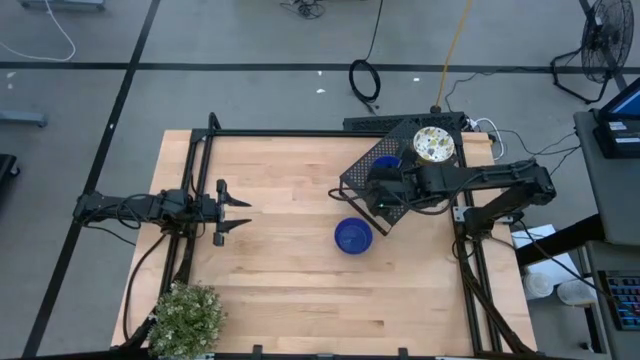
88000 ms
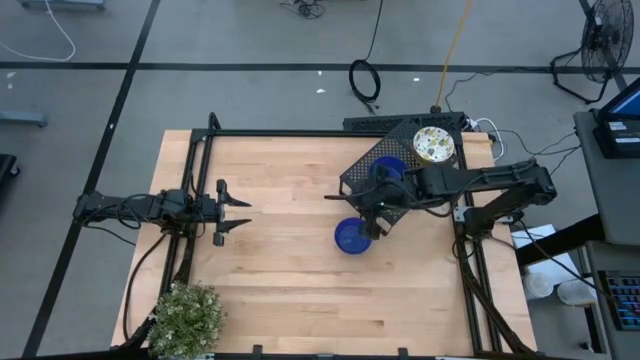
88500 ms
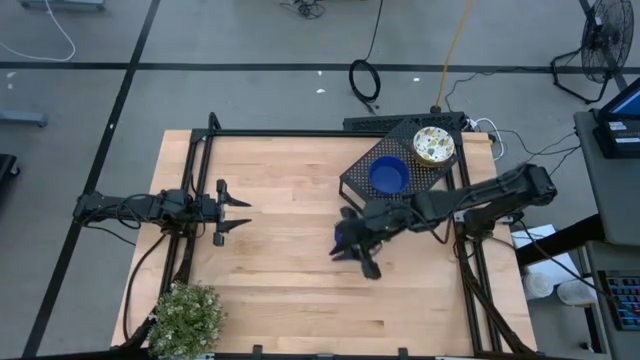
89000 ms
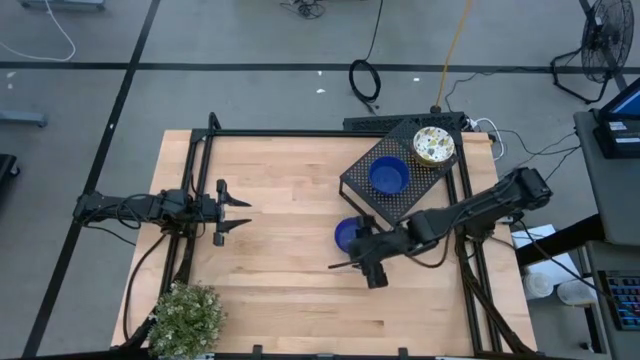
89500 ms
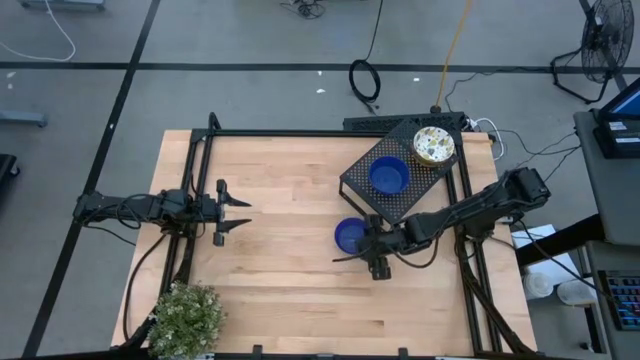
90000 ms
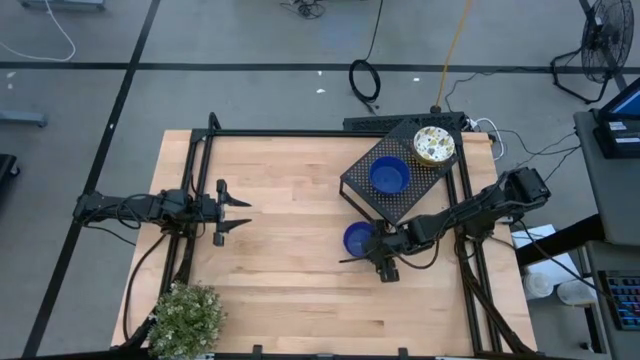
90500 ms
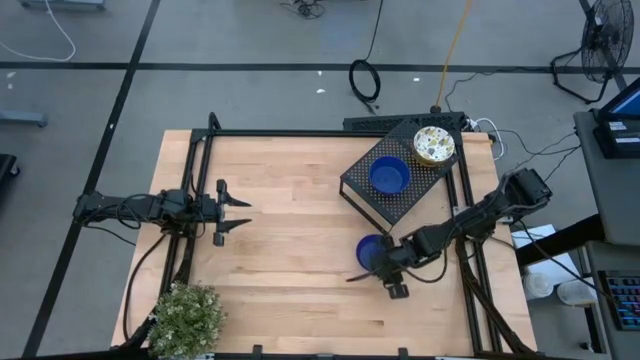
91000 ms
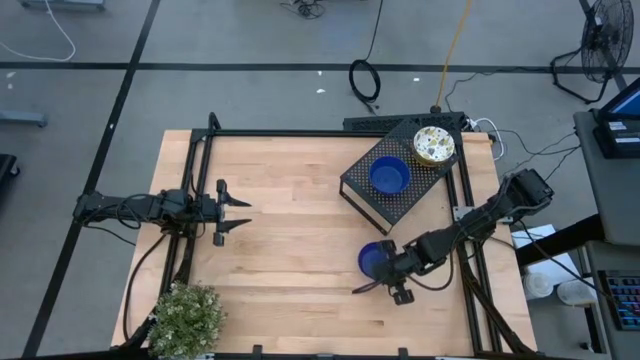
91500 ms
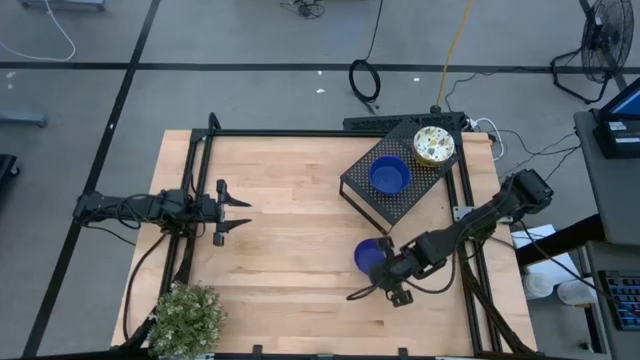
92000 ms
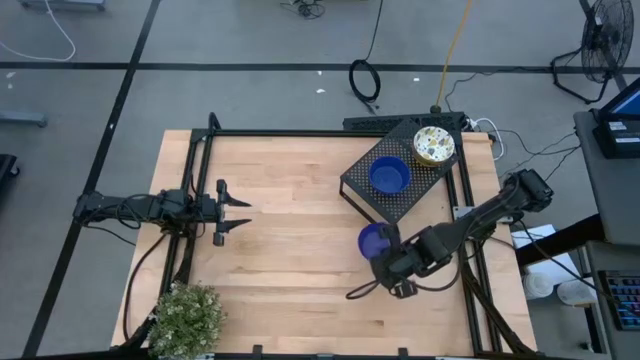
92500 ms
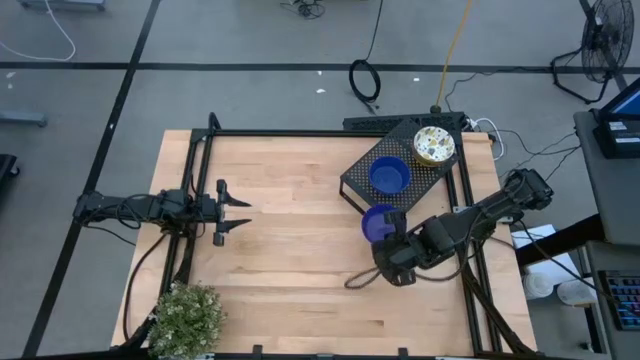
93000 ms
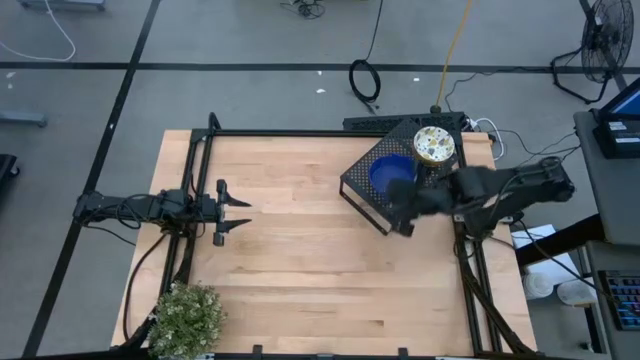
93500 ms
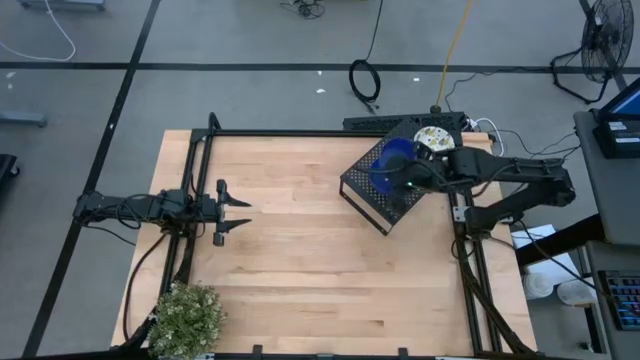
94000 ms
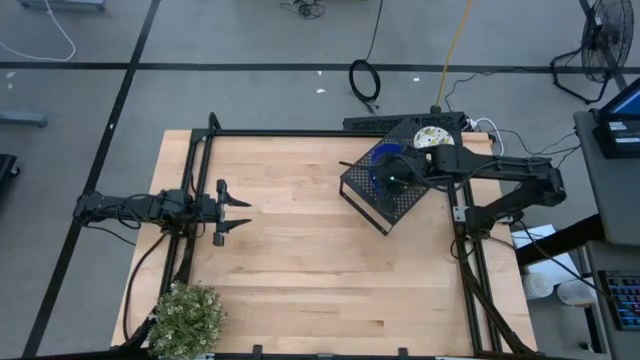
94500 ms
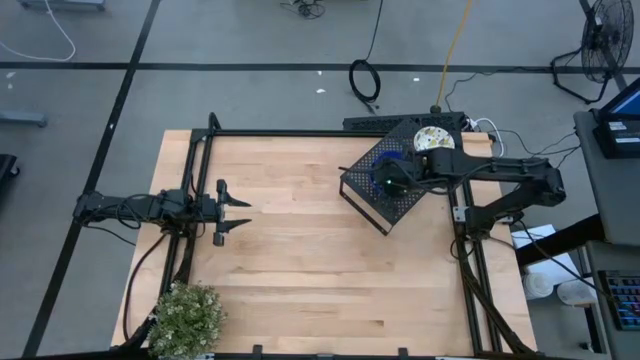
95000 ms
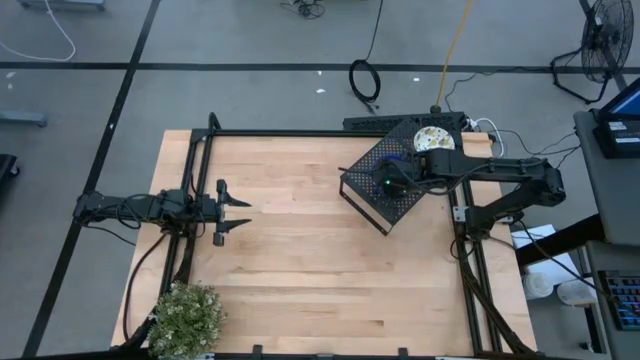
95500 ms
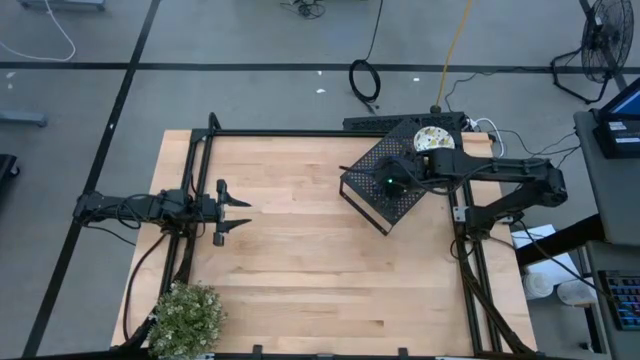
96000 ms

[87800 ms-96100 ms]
Task: Pick & Place Mini bowls
Stack the blue bowl on the blue bowl on the shelf

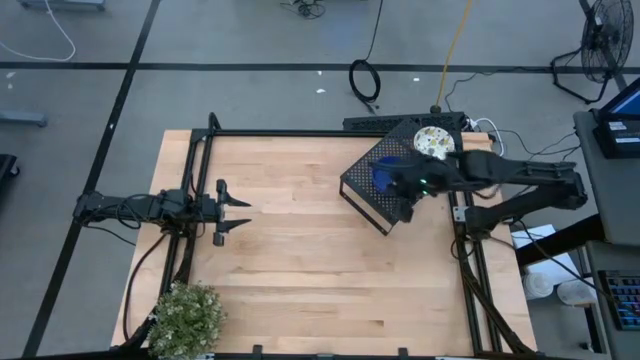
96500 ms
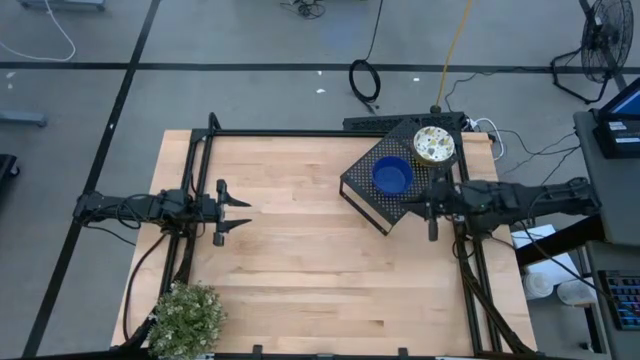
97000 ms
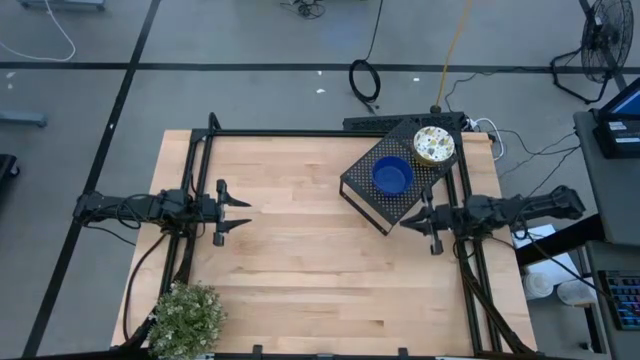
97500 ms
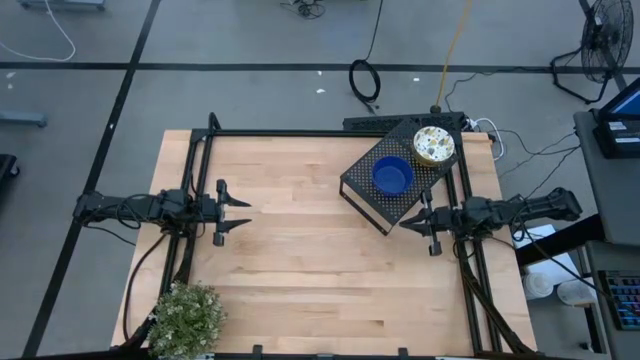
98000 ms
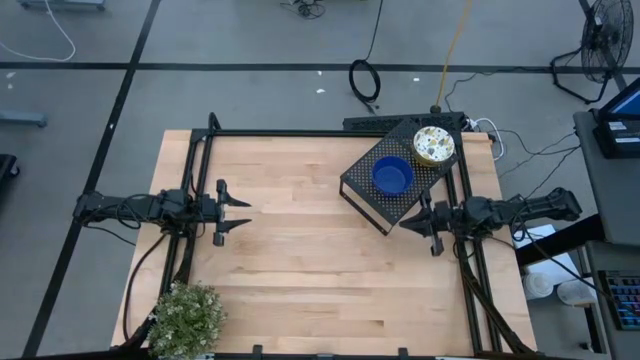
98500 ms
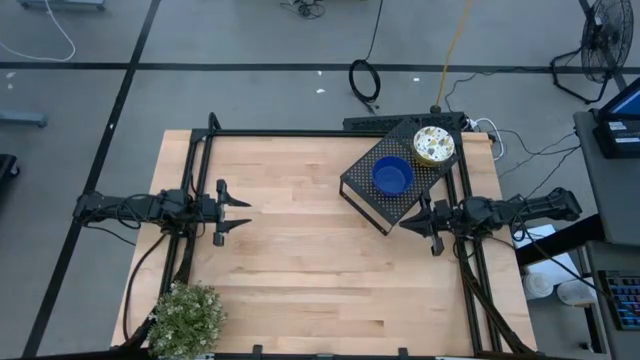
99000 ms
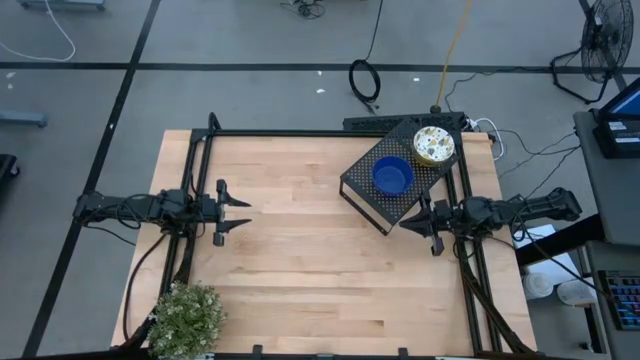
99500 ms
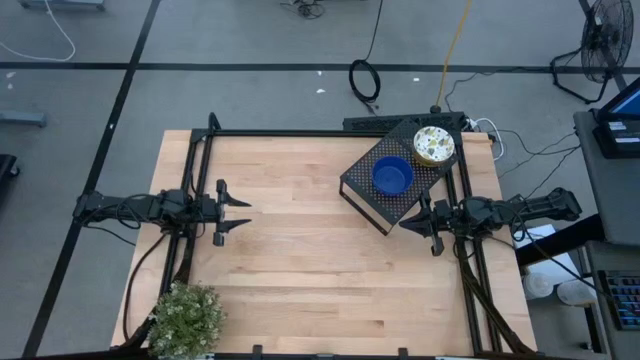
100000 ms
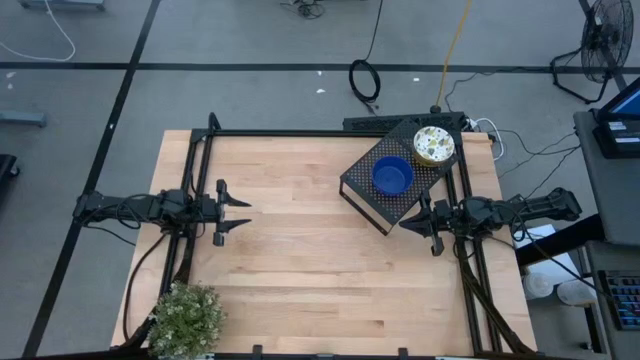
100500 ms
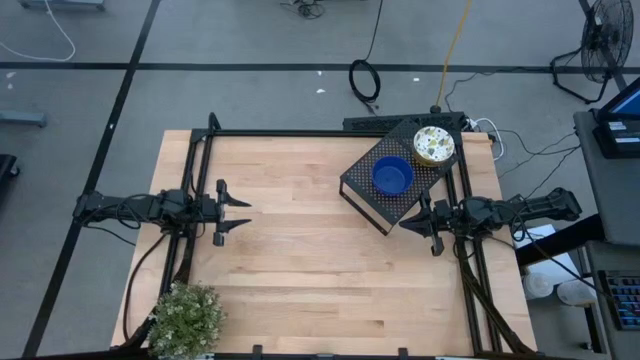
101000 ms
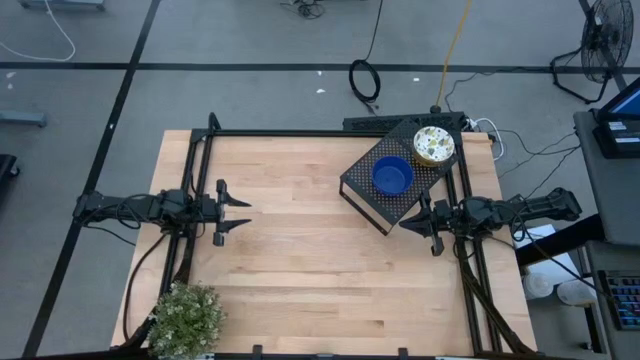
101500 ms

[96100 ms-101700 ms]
Return to Home Position

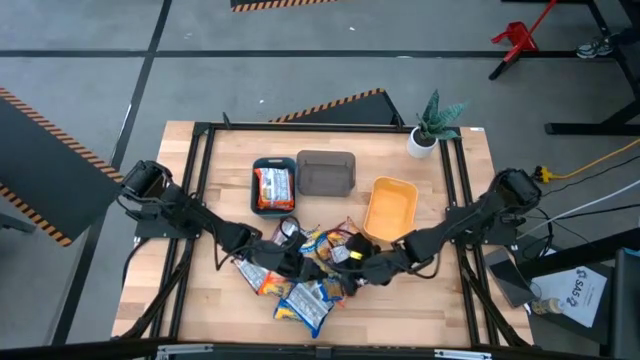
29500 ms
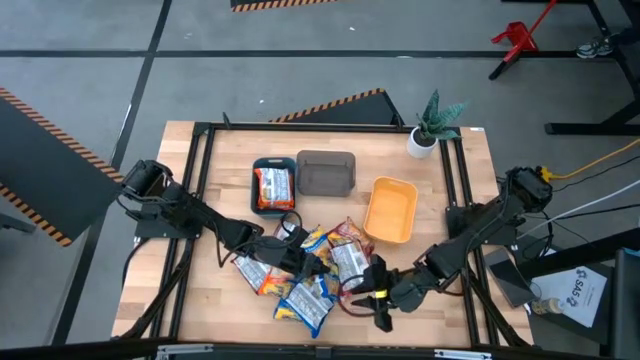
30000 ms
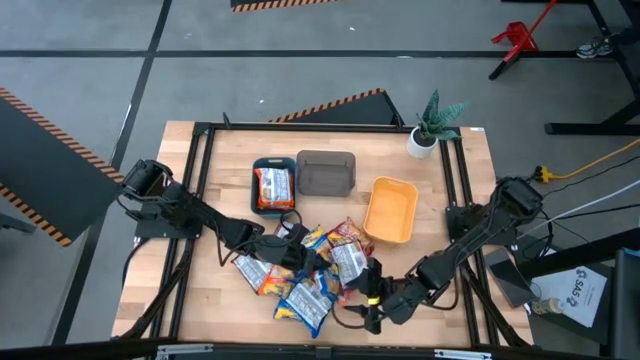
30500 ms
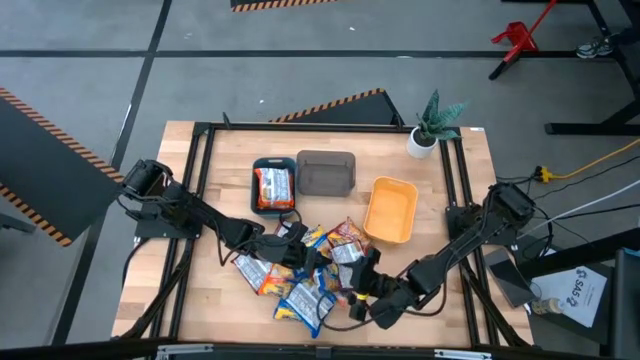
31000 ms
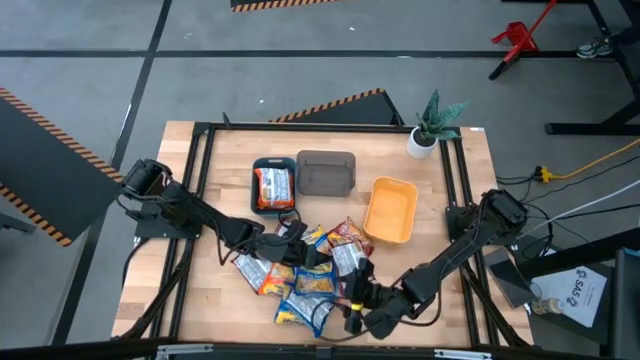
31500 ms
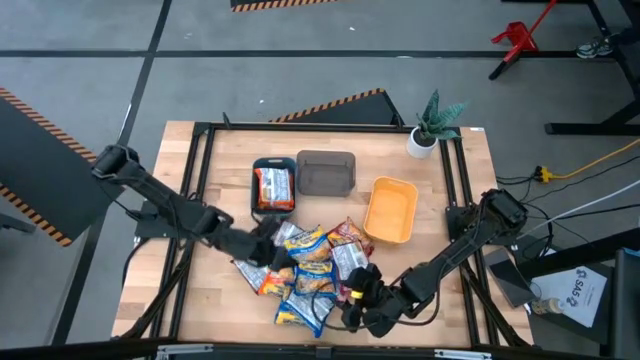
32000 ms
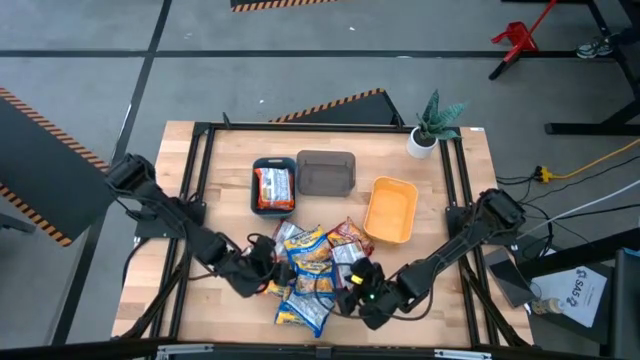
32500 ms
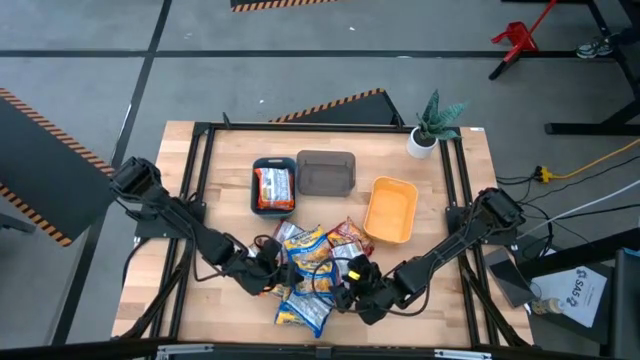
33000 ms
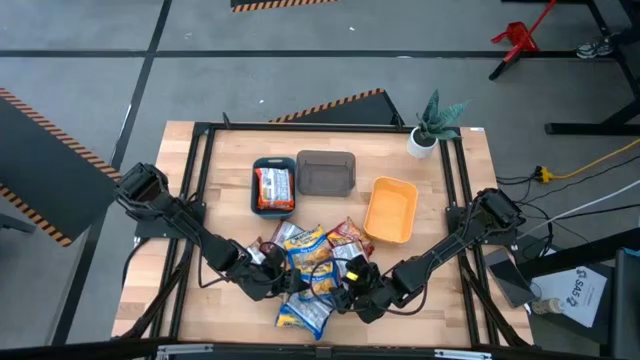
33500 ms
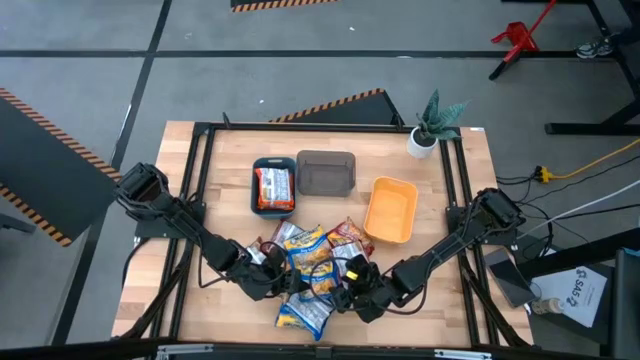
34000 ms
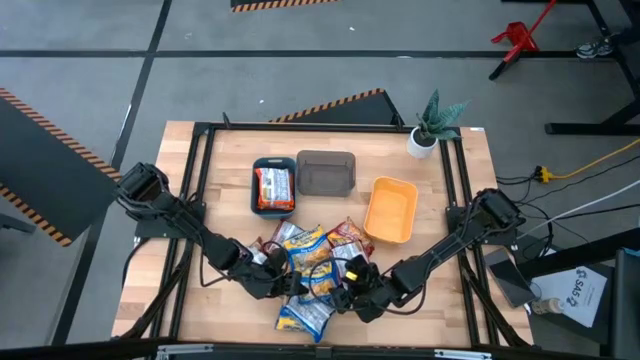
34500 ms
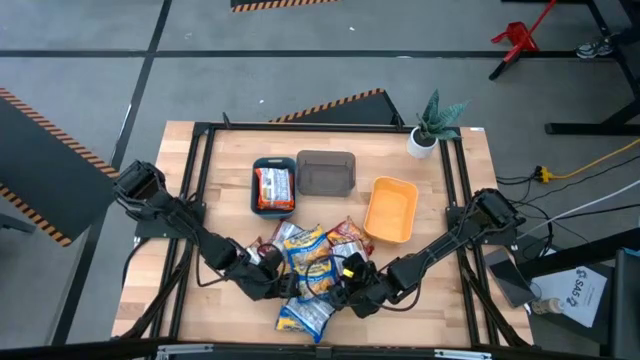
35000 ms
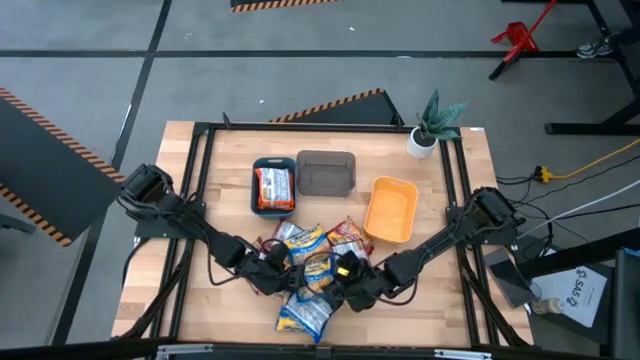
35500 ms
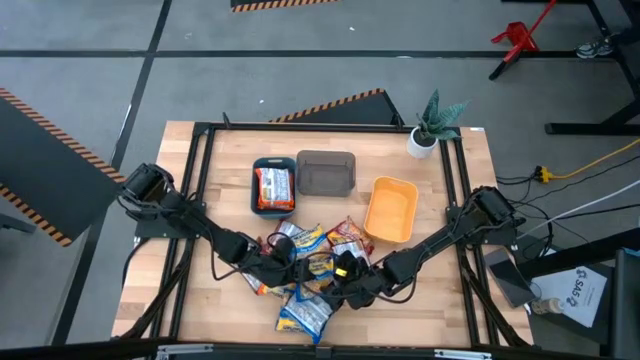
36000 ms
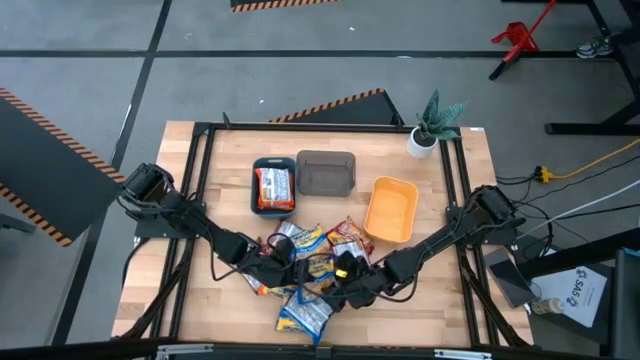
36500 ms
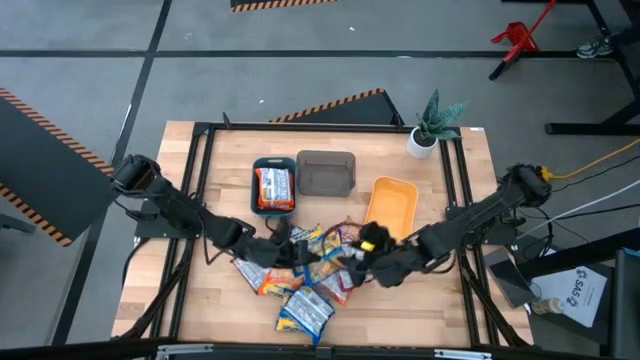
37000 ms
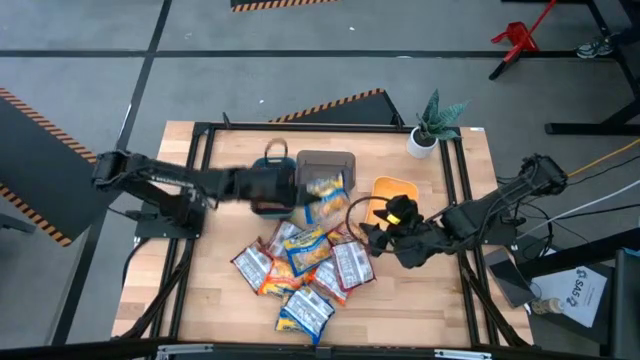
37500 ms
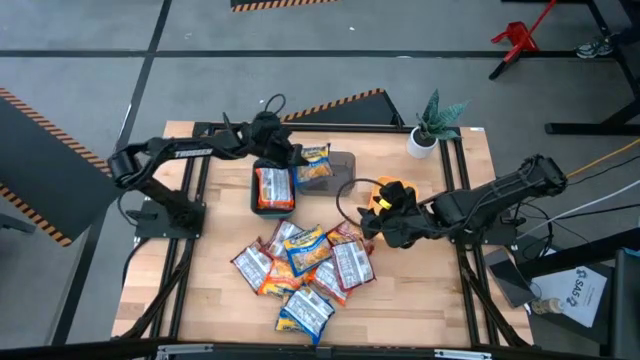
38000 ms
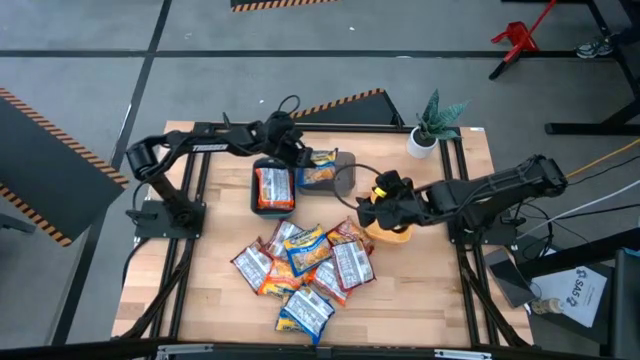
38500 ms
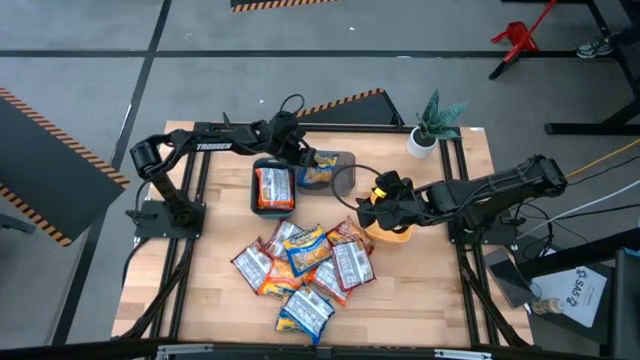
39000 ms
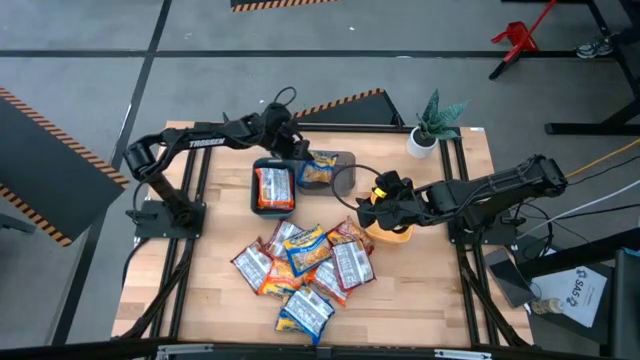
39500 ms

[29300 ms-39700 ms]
Task: Sort Maruchan noodles
Put the blue noodle pack into the black transparent bin
